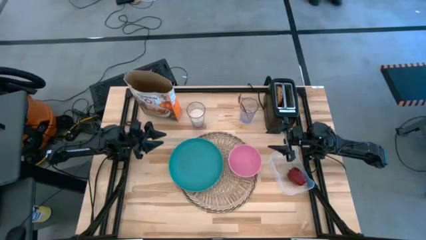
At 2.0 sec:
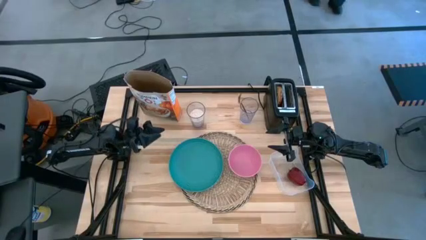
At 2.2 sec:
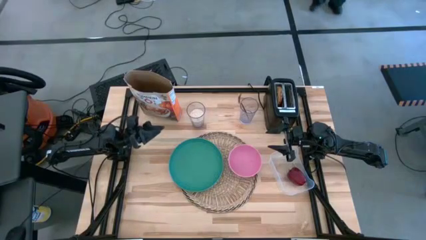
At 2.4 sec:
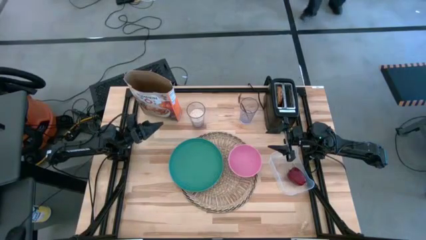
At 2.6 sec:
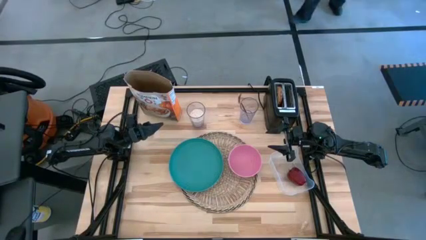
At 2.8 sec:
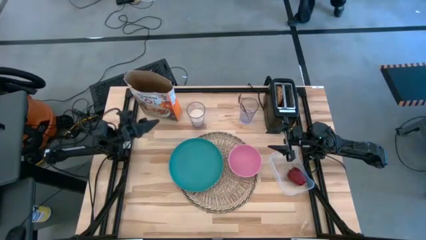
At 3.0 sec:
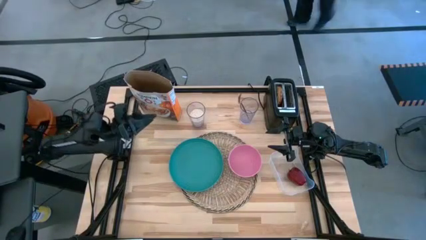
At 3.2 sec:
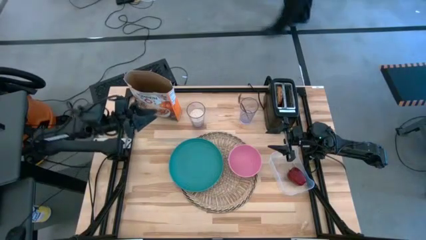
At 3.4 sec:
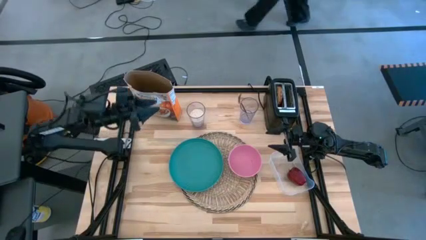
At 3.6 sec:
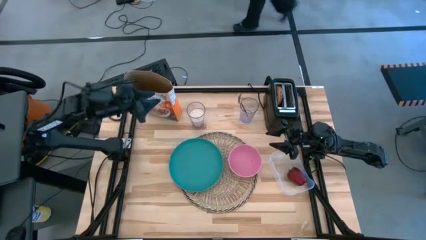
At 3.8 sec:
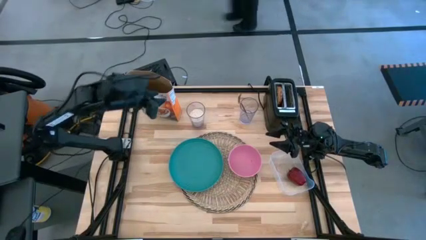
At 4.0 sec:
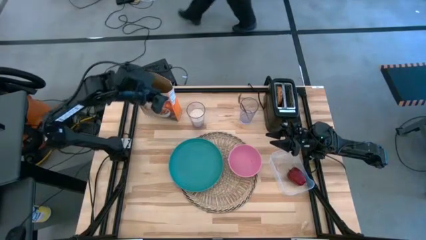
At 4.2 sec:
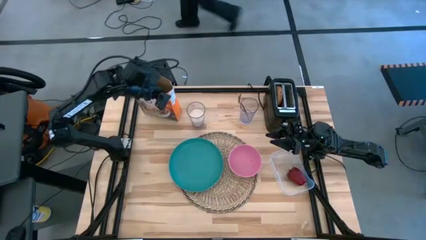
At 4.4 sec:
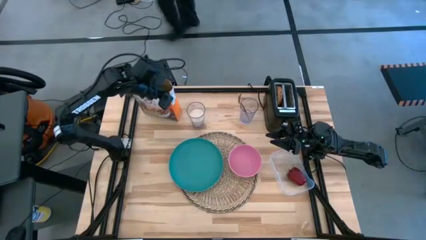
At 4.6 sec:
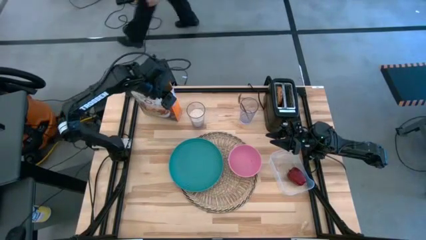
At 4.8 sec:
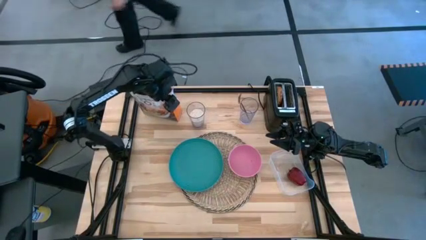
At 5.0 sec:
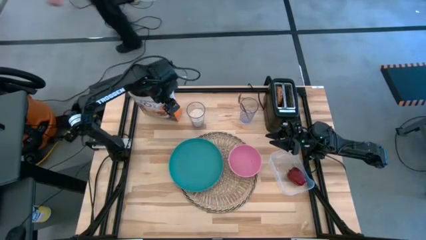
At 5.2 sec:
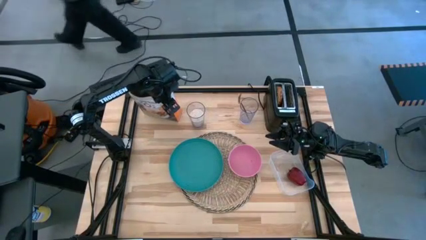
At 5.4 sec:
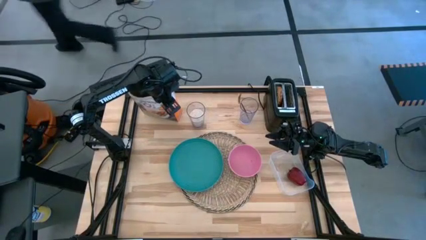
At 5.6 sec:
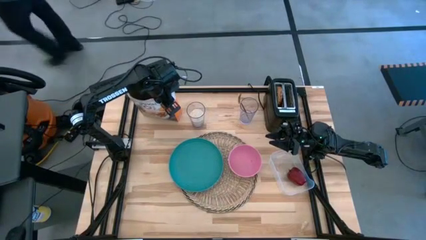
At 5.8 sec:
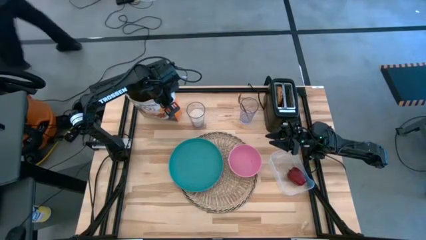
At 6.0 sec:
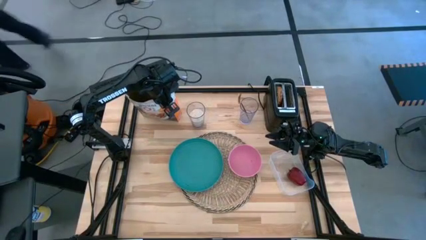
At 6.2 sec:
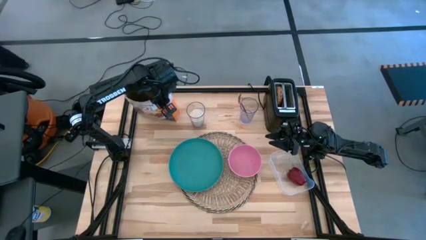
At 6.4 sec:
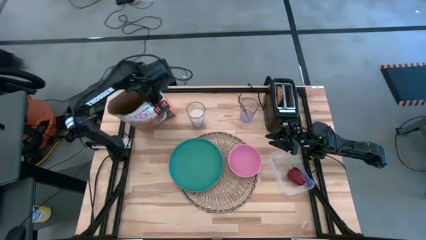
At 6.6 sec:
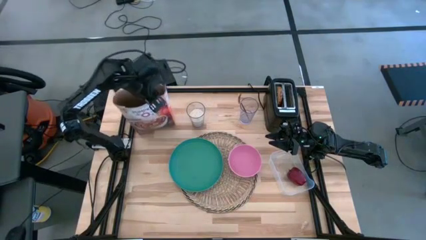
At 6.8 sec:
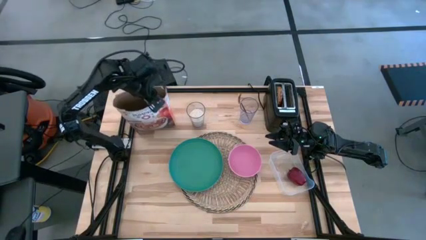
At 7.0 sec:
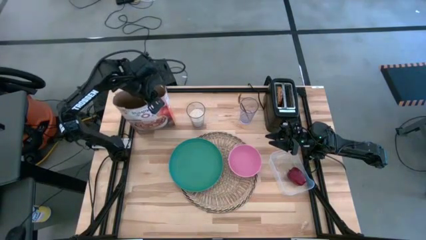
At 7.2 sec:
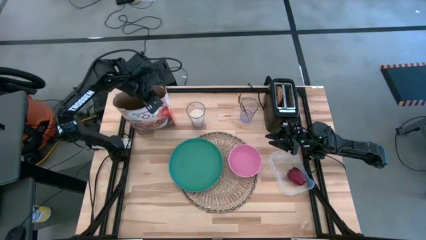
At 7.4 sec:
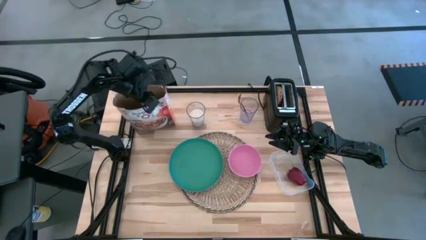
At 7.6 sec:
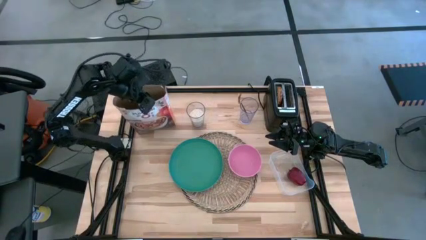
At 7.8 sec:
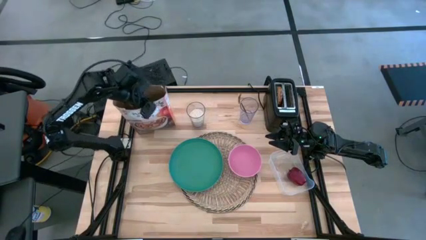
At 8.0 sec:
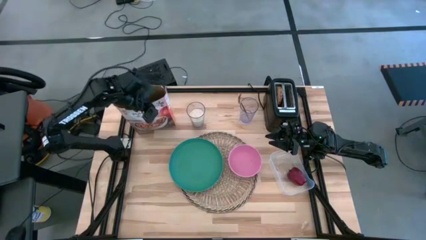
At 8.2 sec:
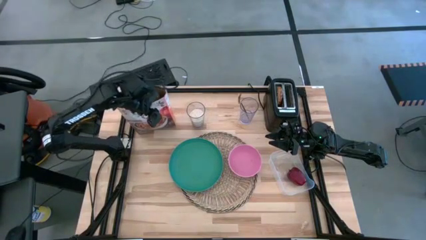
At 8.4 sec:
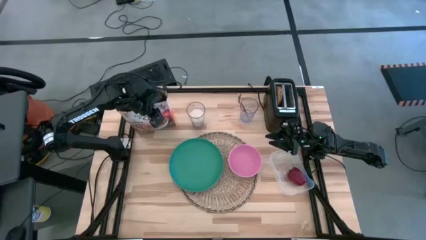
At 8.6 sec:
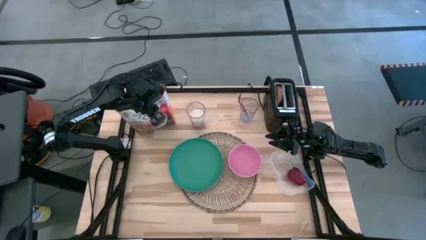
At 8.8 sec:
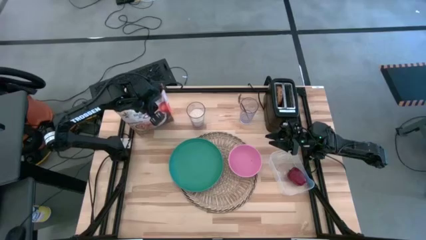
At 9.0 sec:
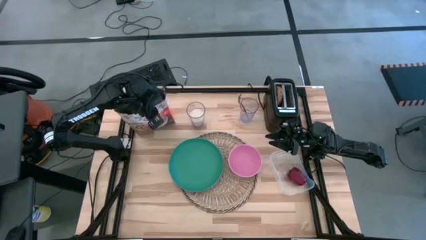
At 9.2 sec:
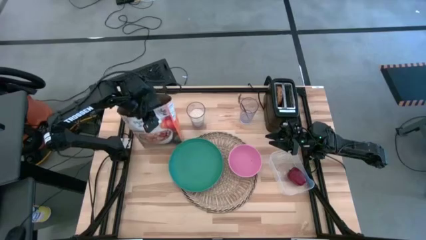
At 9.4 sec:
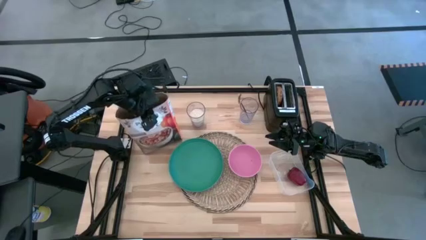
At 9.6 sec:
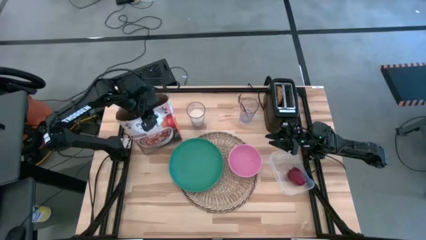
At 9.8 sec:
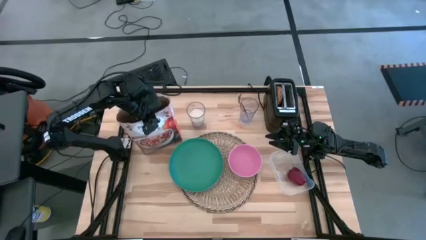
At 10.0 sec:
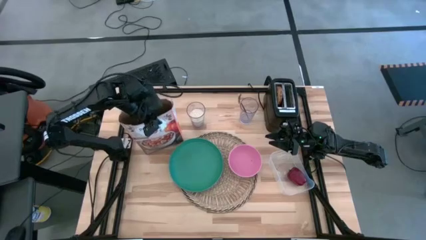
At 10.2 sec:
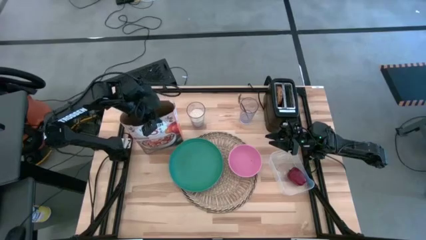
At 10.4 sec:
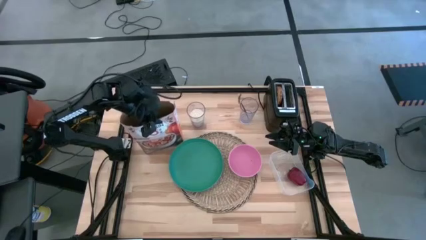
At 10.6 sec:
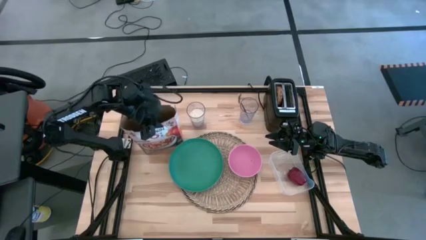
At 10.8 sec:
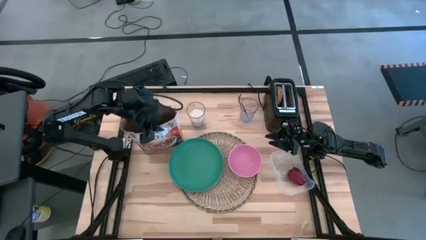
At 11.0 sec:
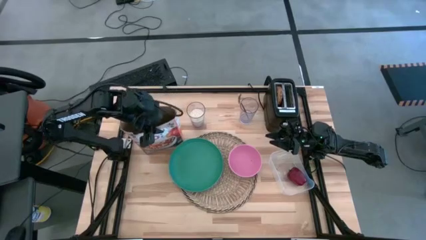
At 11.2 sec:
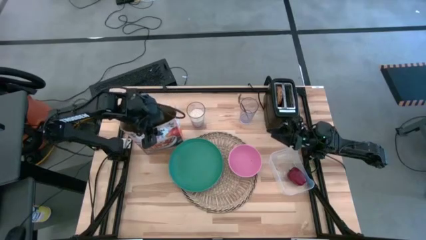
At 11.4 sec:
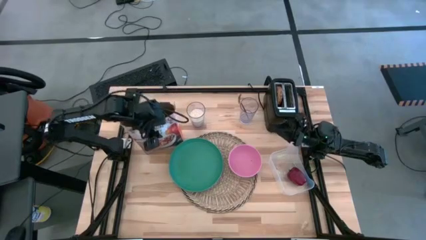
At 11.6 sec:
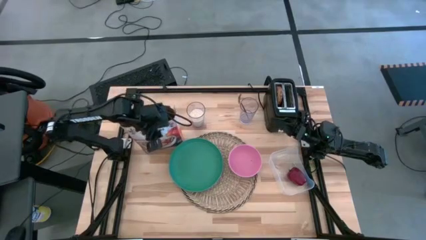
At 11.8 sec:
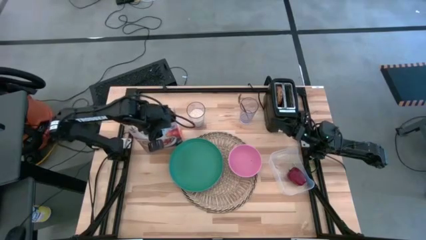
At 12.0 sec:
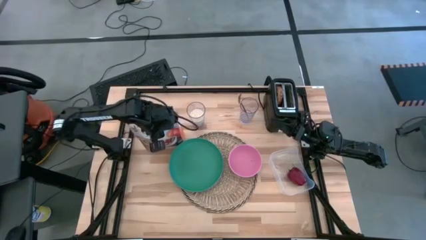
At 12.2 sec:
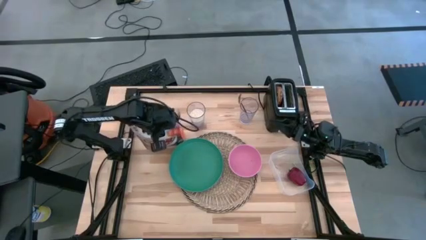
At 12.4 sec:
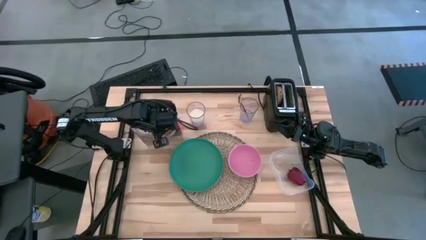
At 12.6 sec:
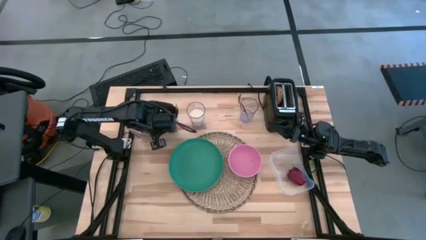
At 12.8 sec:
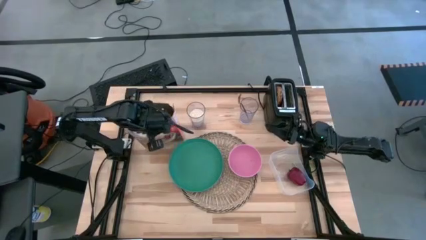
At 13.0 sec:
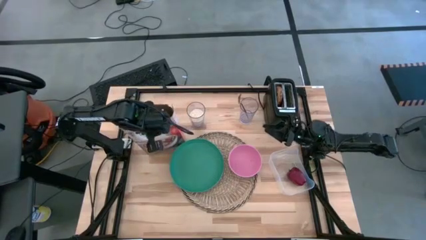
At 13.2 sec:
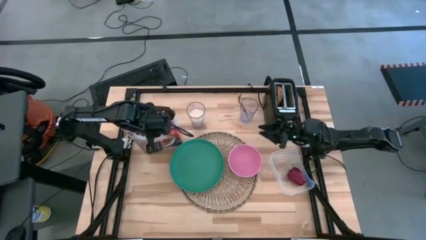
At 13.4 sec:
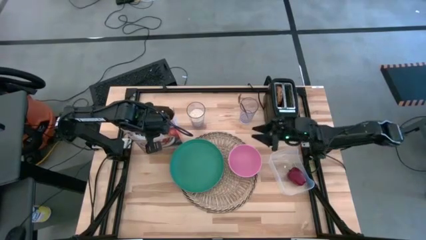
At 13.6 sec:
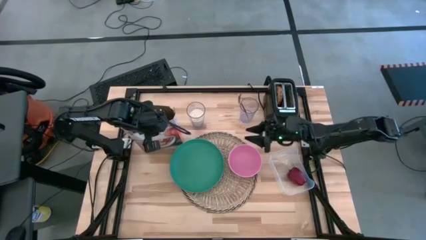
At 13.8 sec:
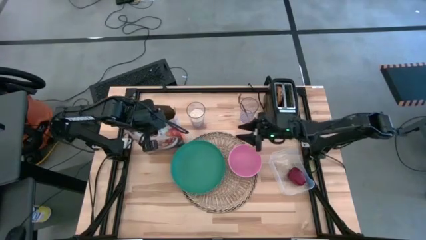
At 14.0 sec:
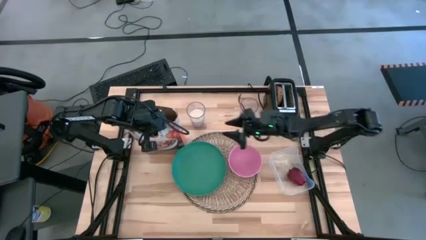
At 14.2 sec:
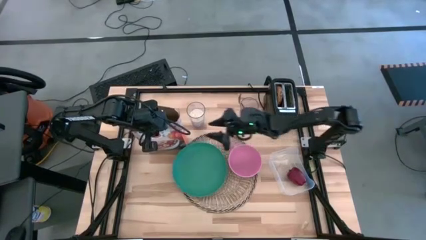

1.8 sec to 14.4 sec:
Task: Arrange a breakfast setting
Pour the cereals from the box into the pink bowl
